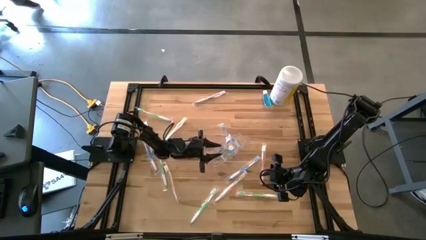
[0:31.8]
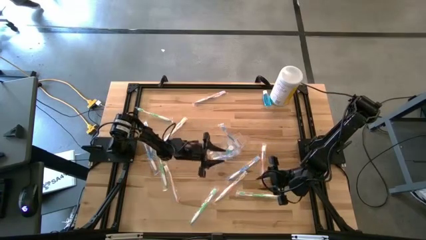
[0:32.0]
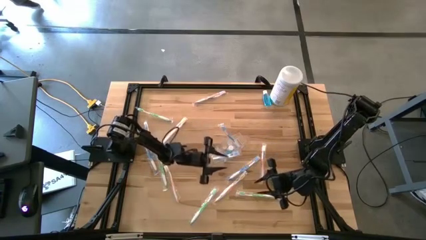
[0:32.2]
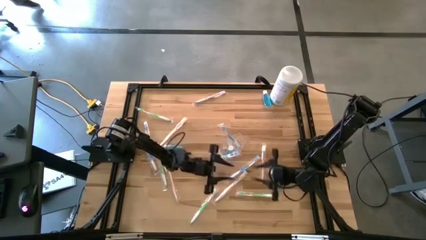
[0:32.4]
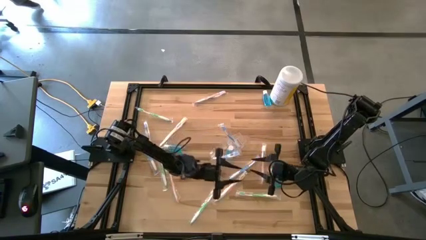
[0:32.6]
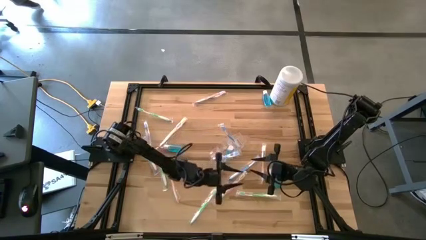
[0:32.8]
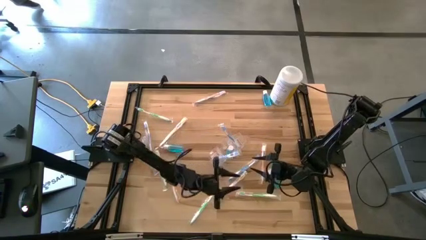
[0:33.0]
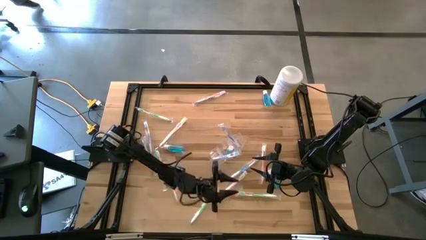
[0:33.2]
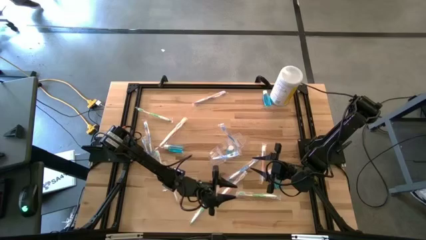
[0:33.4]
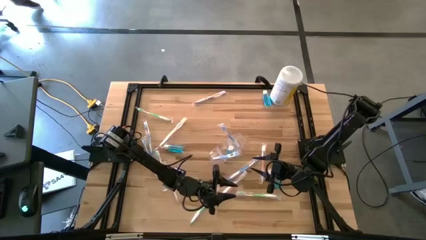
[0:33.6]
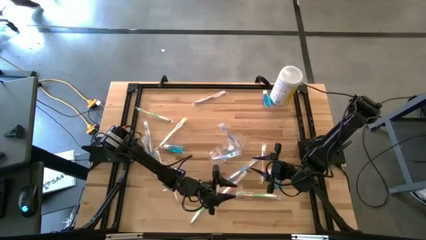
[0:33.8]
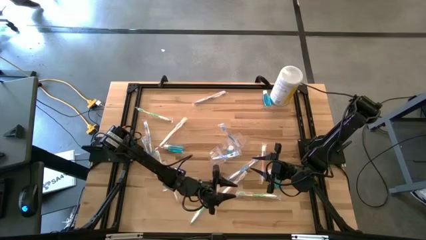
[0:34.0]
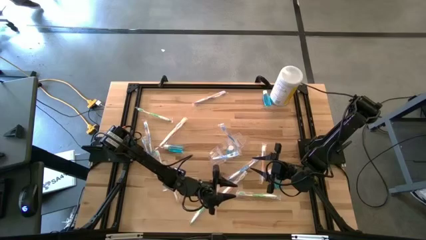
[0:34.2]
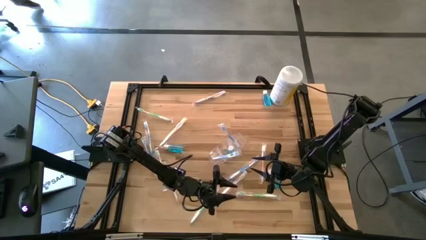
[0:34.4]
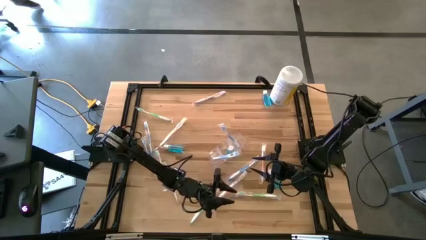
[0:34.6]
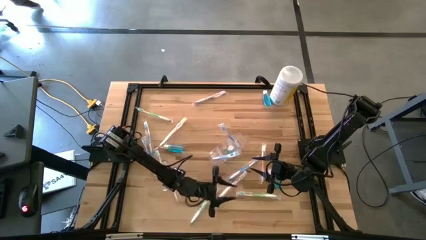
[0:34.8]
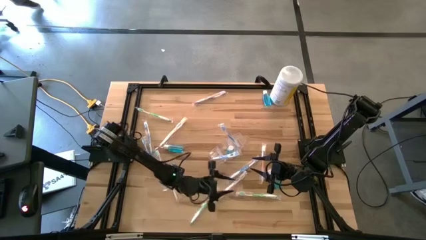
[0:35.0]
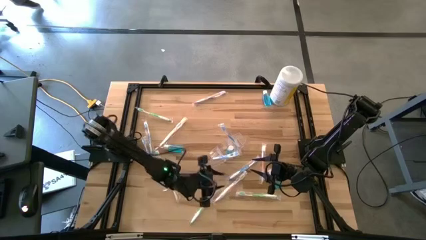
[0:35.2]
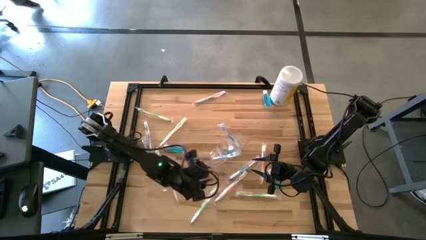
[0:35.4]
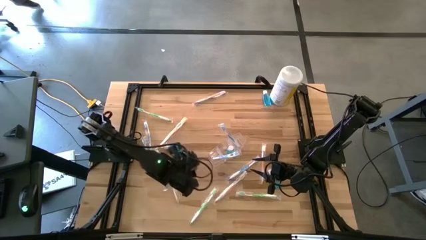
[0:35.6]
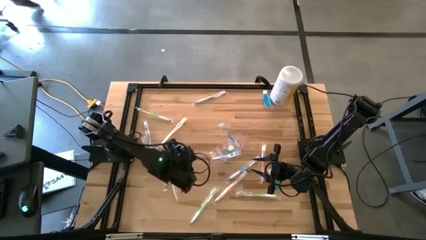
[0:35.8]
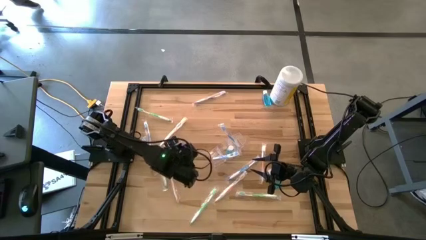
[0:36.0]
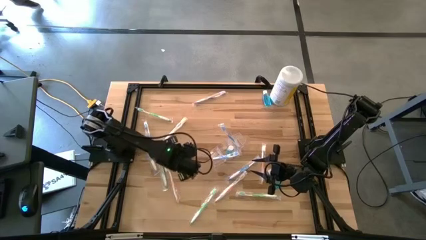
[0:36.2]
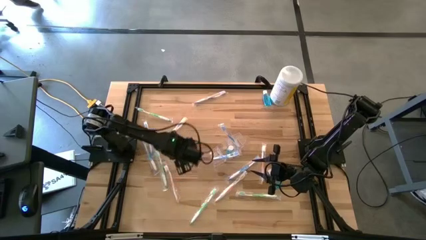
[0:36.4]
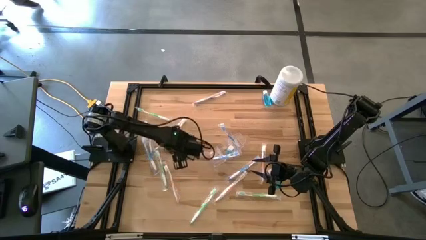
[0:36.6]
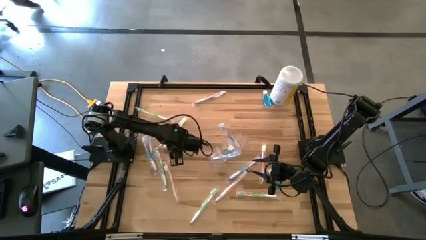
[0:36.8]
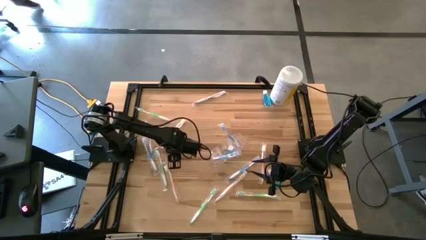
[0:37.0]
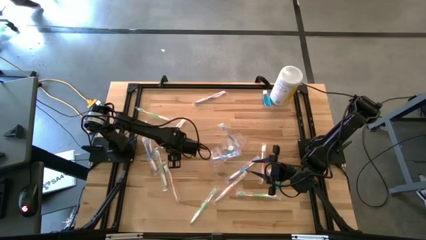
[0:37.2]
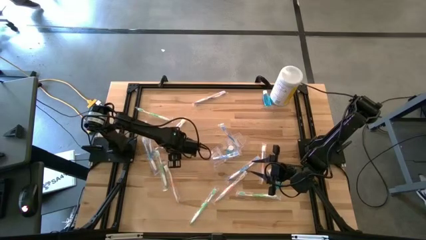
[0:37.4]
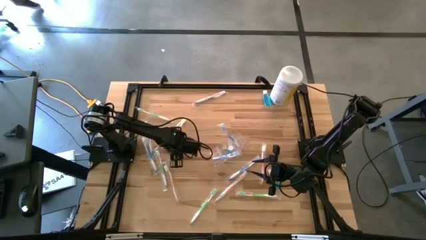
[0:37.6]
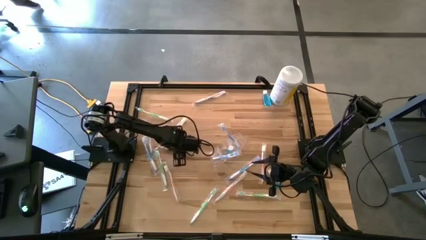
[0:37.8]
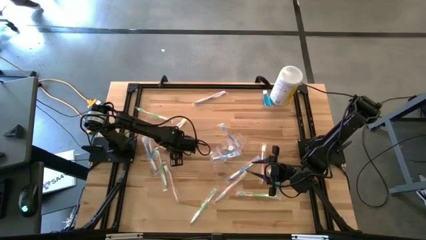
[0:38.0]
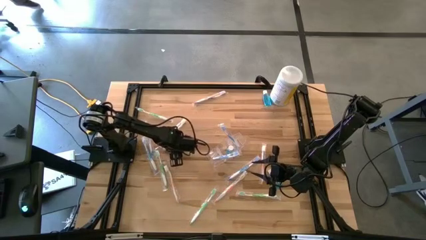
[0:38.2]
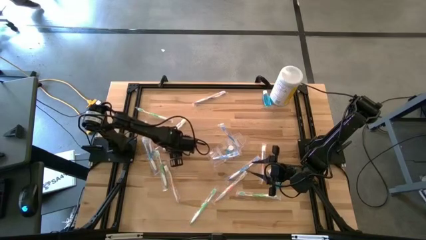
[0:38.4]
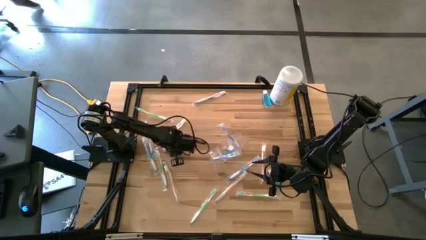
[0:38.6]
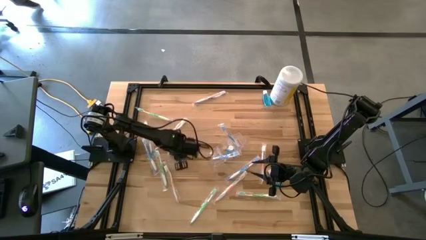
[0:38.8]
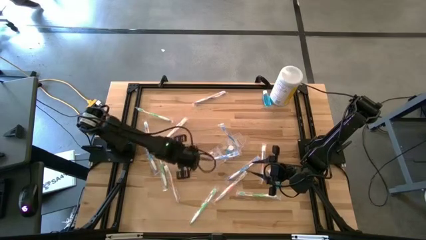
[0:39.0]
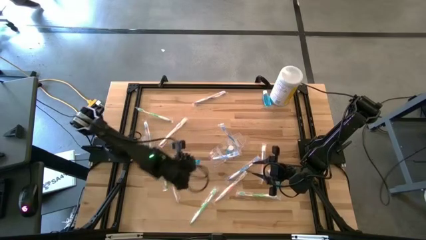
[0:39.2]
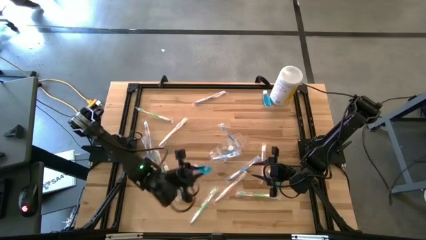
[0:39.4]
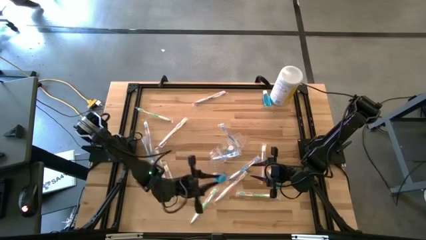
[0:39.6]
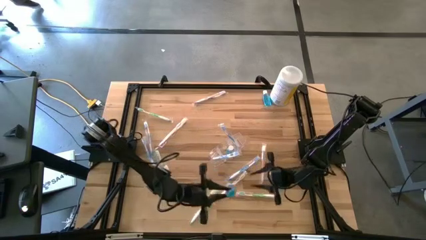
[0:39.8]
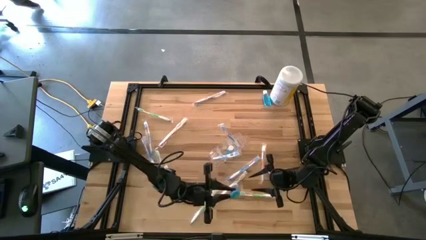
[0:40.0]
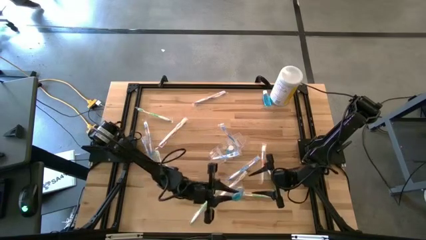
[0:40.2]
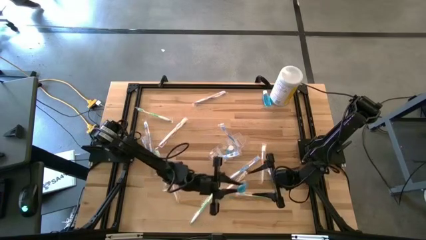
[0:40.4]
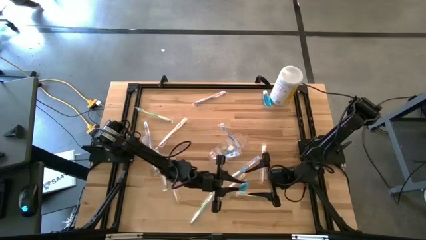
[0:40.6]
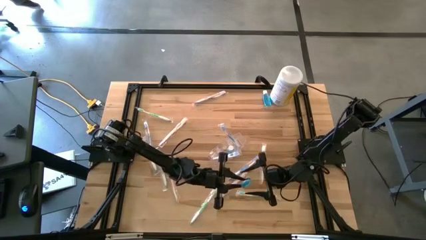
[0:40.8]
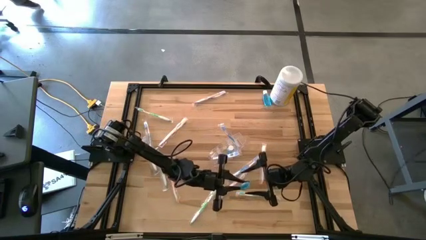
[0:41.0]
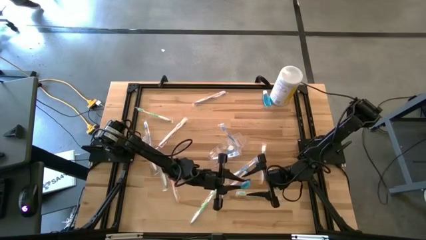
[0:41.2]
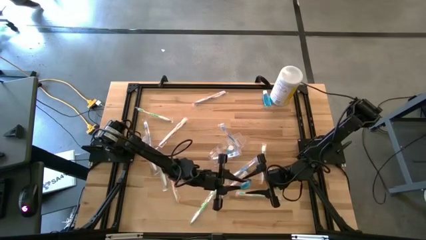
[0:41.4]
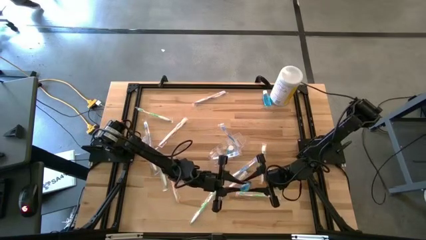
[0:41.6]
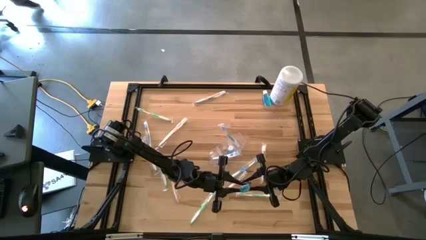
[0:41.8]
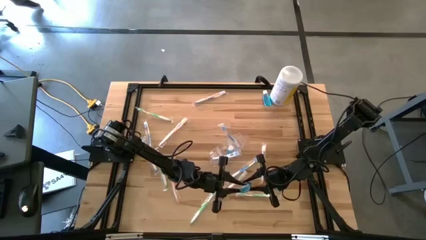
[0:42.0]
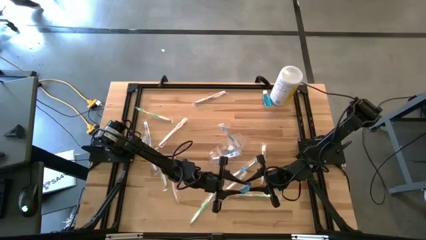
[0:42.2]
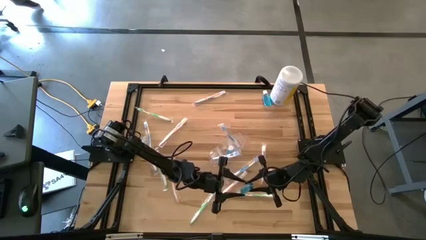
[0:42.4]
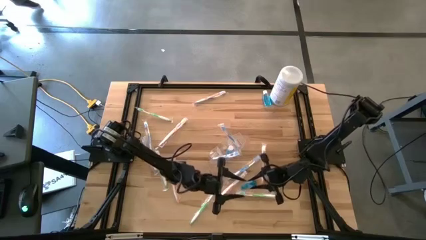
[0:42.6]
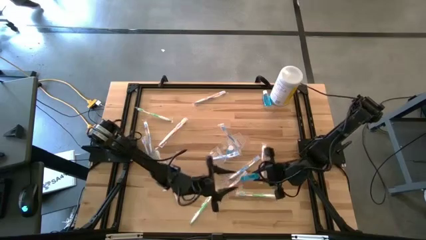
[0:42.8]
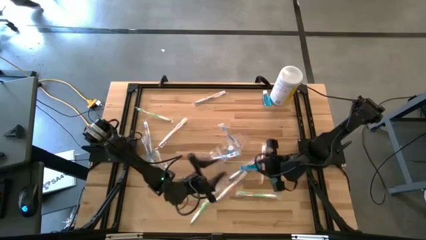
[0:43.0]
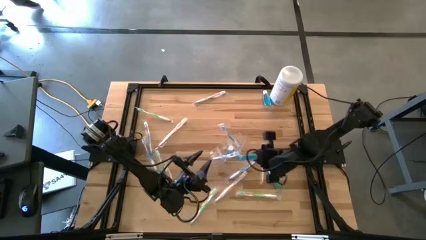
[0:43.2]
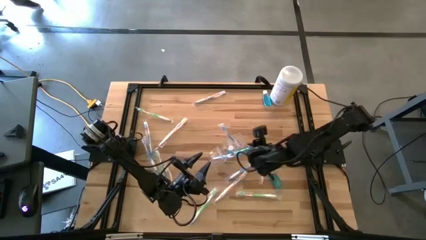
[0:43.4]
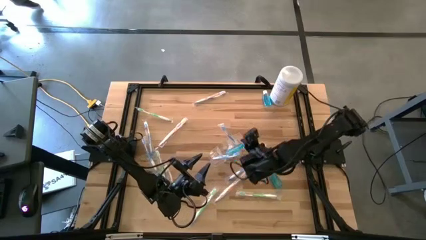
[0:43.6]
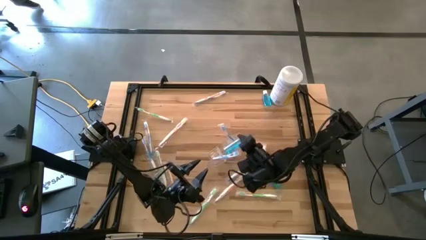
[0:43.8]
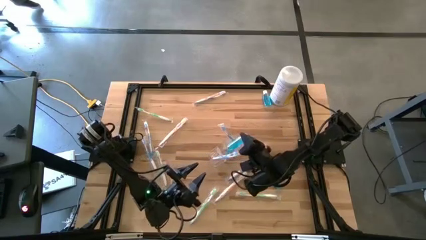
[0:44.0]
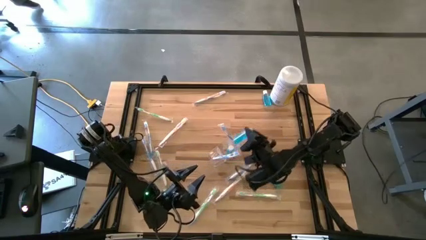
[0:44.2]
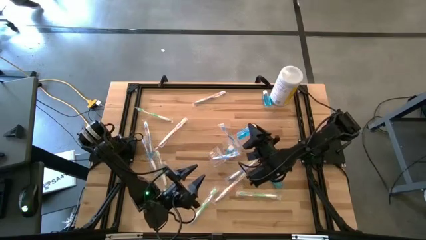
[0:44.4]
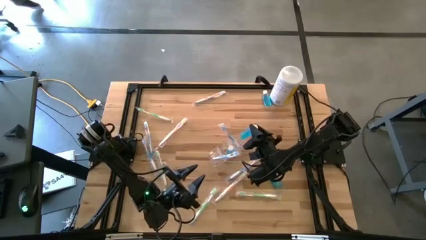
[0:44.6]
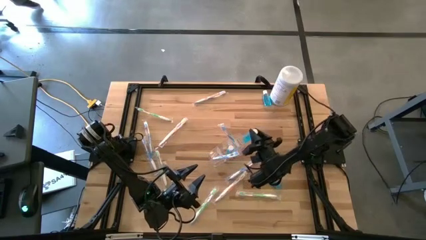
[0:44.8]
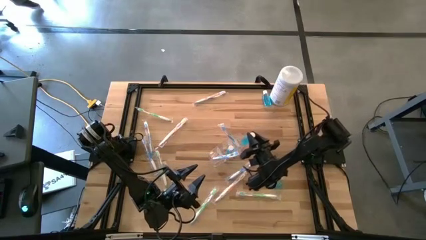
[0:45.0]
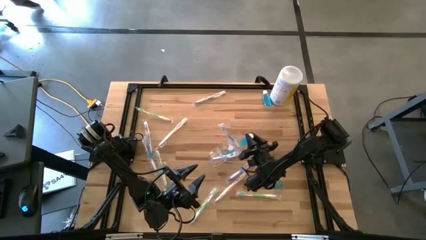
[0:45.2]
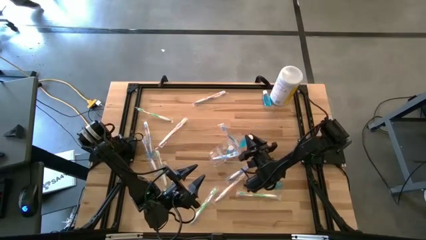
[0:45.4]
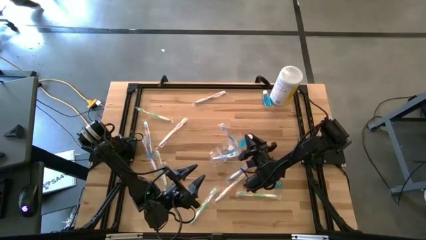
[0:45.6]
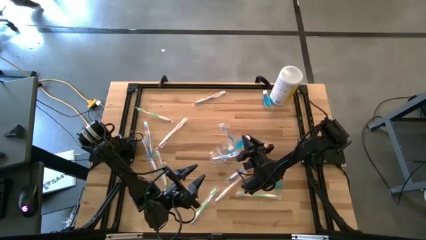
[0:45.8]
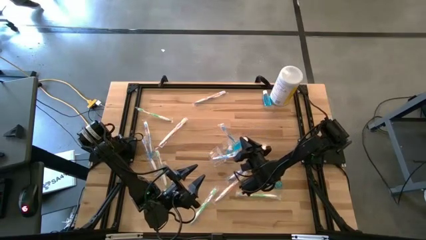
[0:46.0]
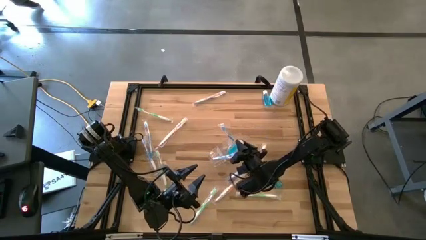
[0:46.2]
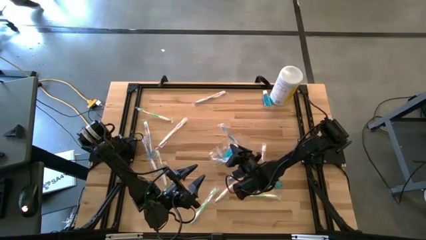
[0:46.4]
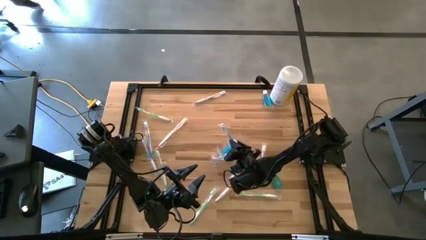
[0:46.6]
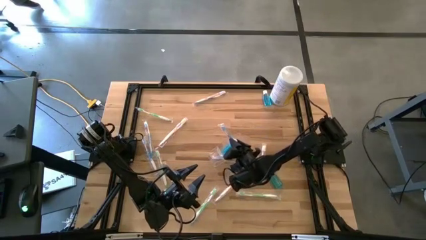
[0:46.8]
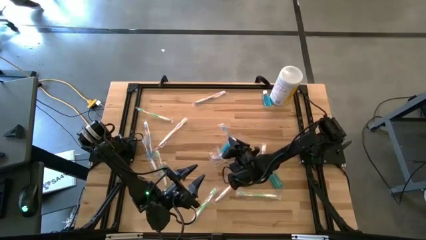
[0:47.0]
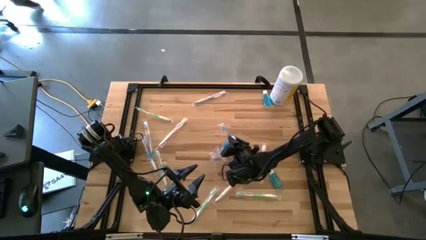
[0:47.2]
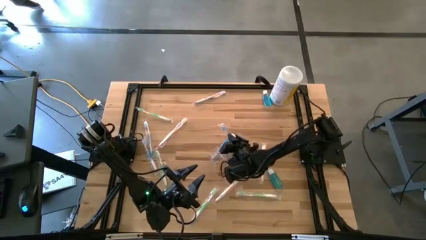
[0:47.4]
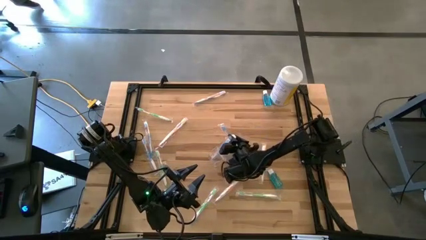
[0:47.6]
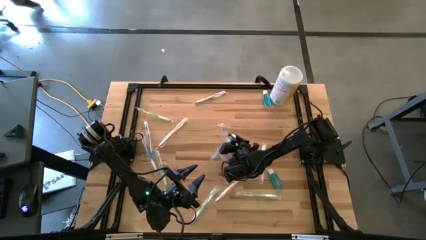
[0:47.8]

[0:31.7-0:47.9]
Task: Pick & Place toothbrushing station
Put the blue mouthwash into the transparent organizer
